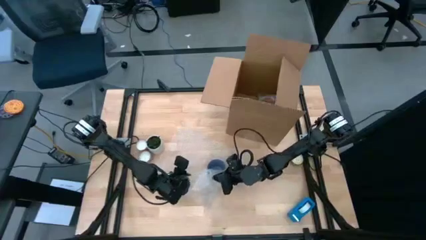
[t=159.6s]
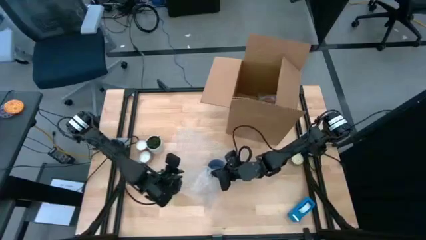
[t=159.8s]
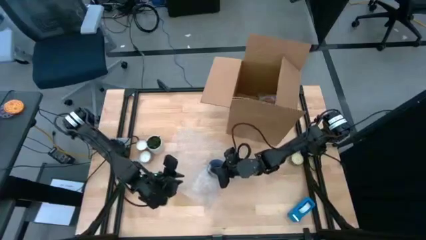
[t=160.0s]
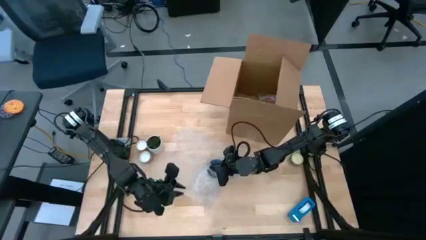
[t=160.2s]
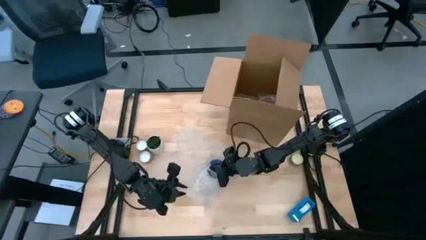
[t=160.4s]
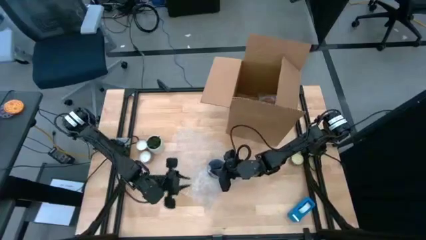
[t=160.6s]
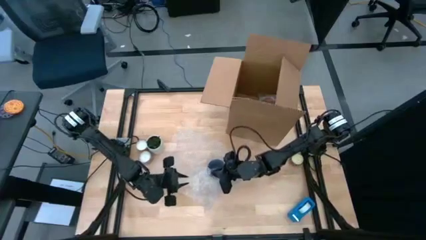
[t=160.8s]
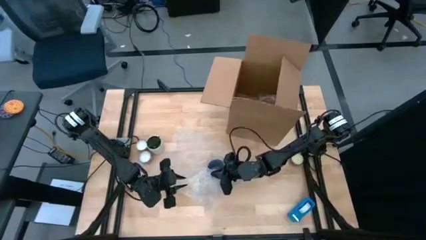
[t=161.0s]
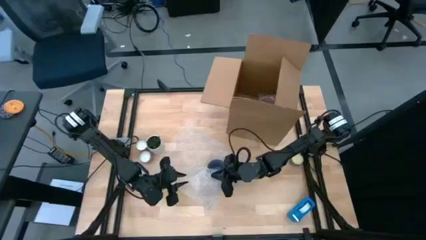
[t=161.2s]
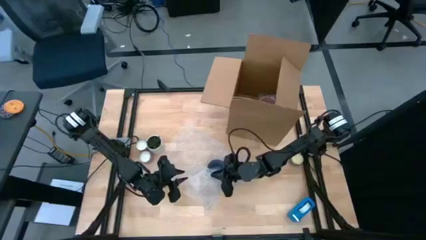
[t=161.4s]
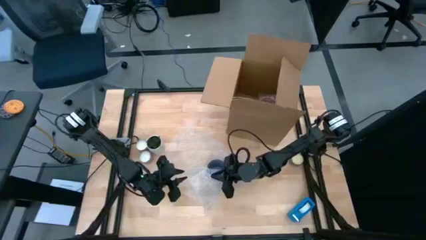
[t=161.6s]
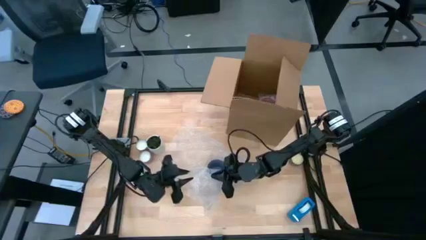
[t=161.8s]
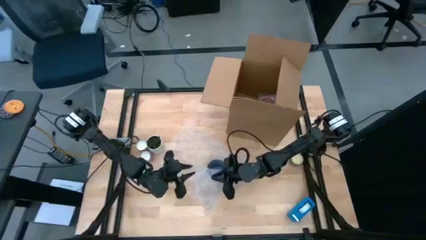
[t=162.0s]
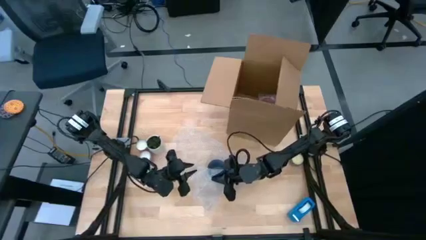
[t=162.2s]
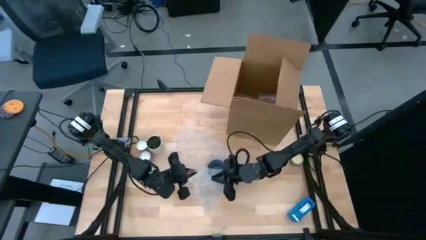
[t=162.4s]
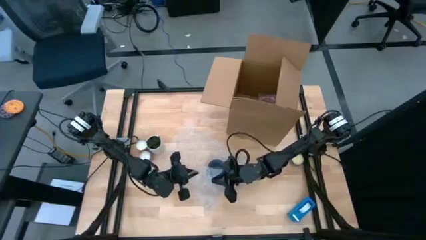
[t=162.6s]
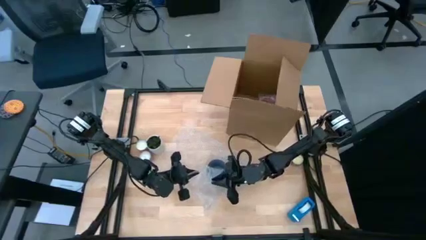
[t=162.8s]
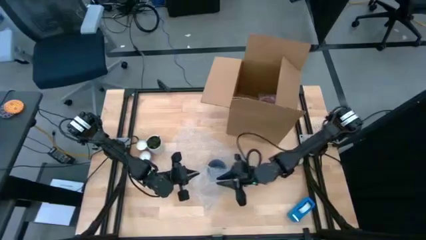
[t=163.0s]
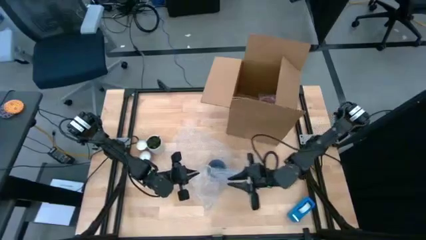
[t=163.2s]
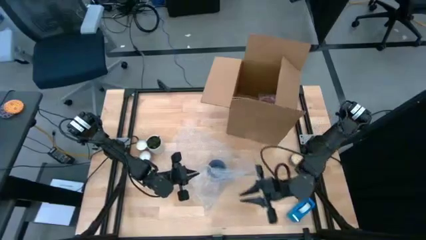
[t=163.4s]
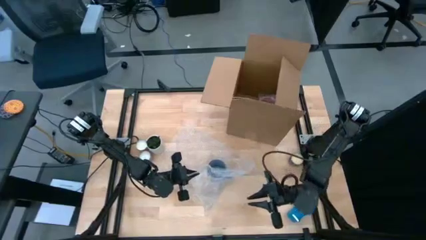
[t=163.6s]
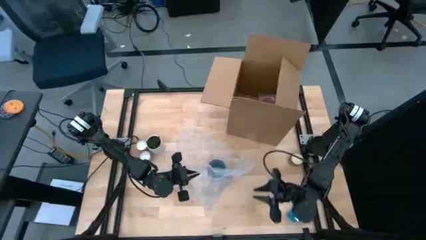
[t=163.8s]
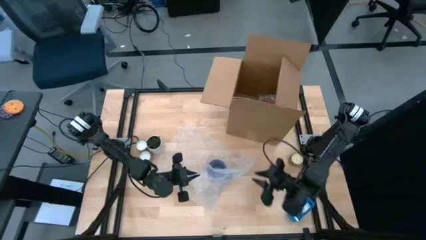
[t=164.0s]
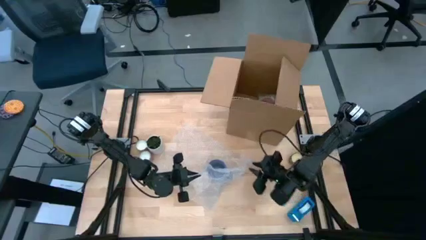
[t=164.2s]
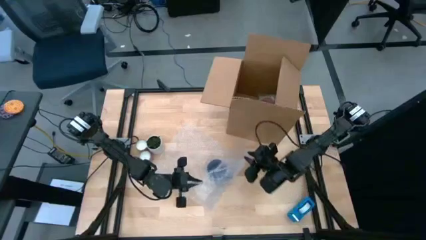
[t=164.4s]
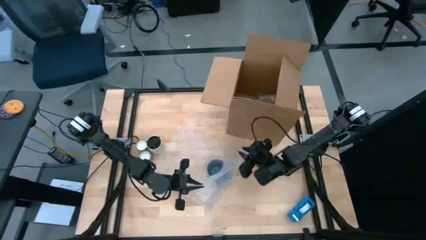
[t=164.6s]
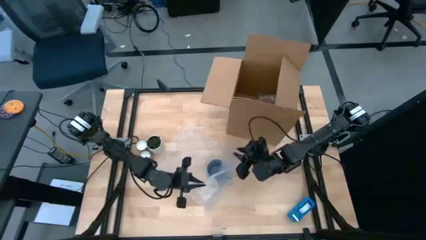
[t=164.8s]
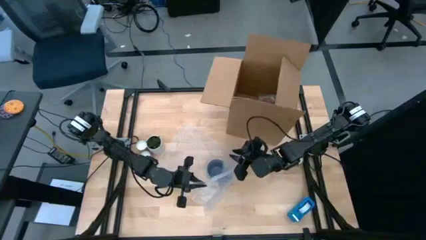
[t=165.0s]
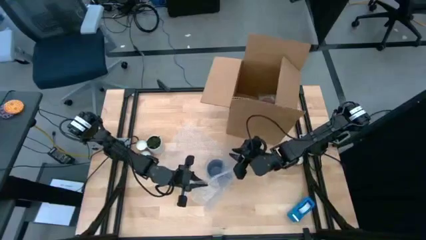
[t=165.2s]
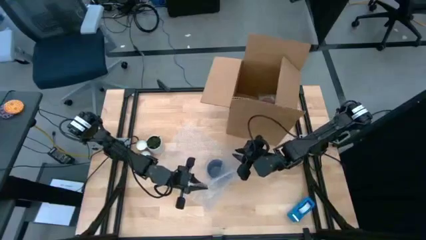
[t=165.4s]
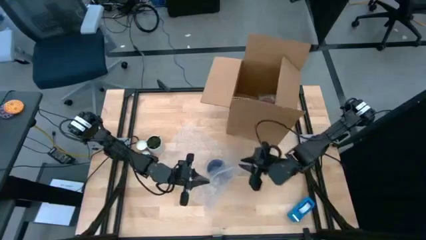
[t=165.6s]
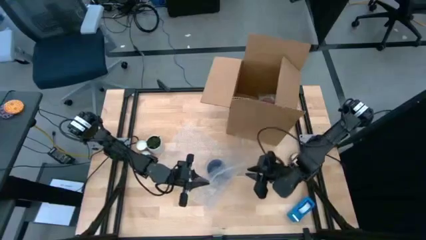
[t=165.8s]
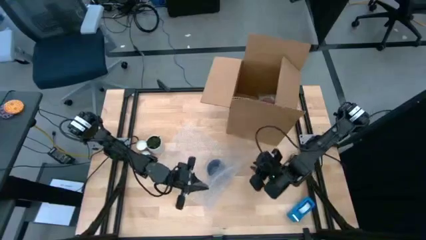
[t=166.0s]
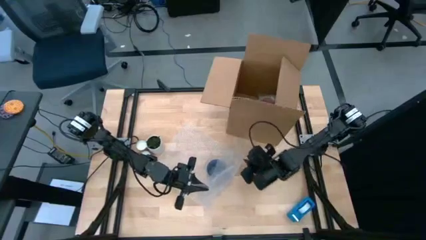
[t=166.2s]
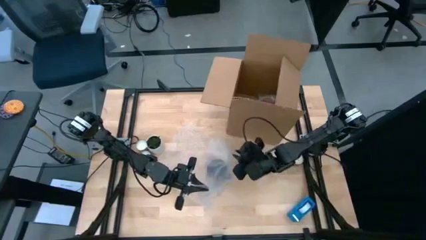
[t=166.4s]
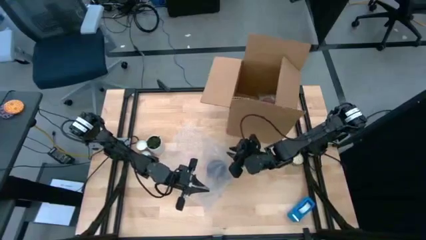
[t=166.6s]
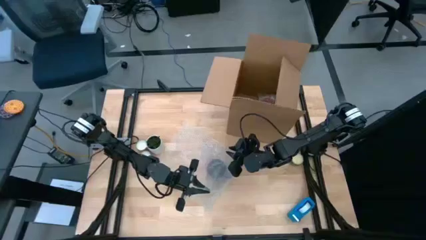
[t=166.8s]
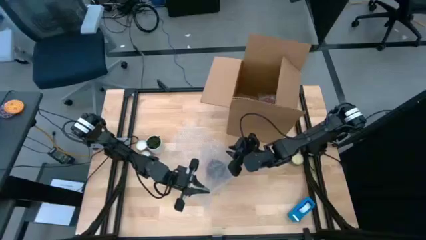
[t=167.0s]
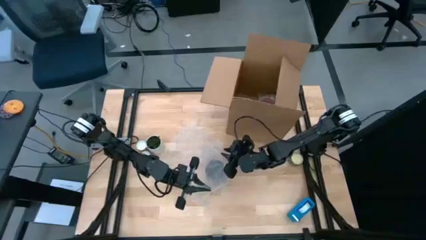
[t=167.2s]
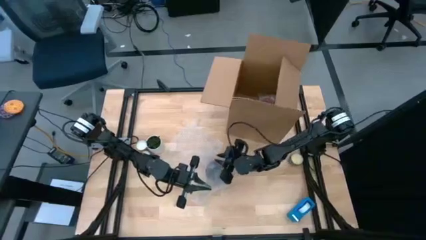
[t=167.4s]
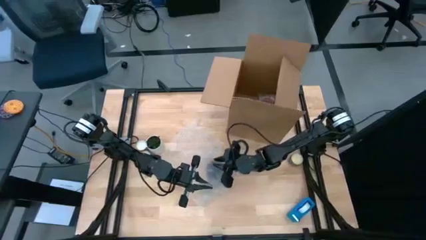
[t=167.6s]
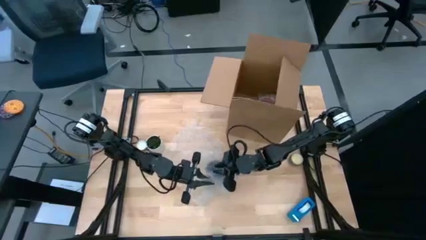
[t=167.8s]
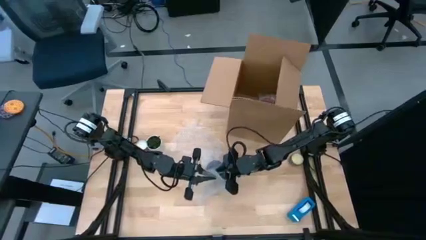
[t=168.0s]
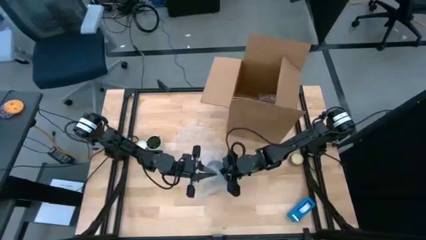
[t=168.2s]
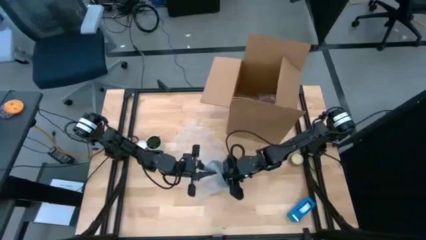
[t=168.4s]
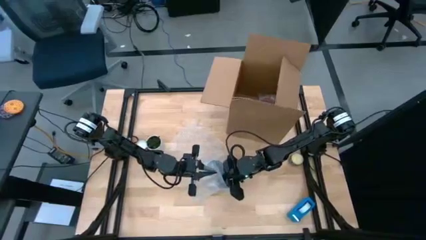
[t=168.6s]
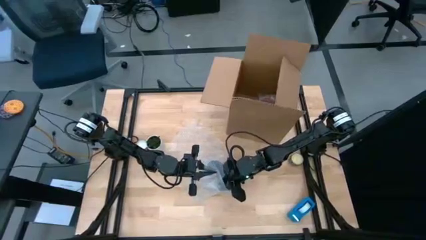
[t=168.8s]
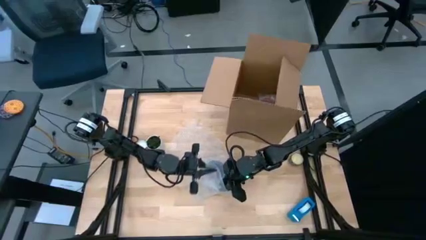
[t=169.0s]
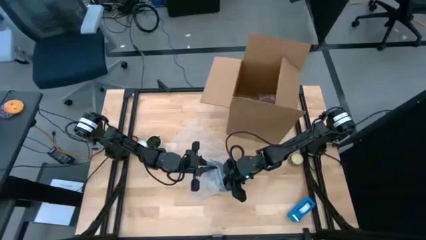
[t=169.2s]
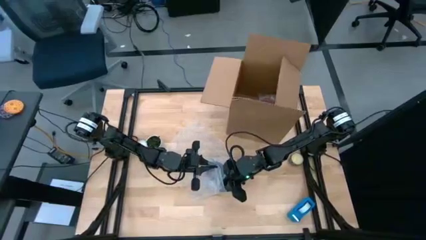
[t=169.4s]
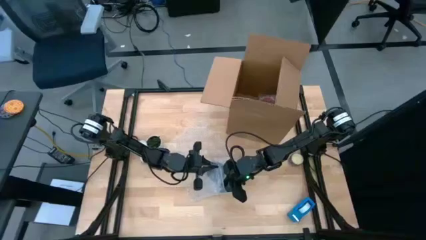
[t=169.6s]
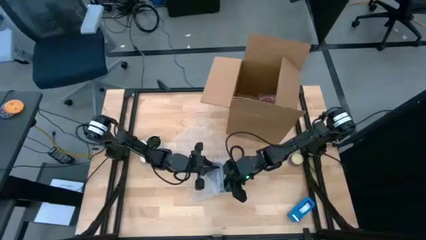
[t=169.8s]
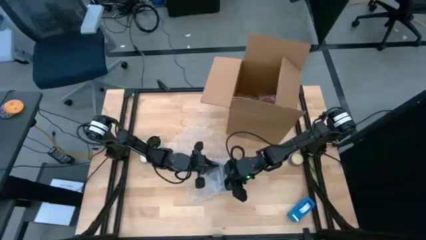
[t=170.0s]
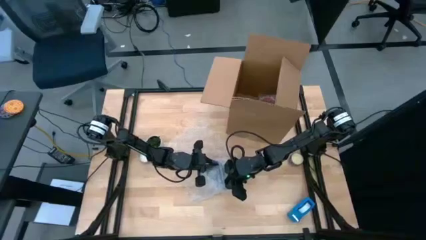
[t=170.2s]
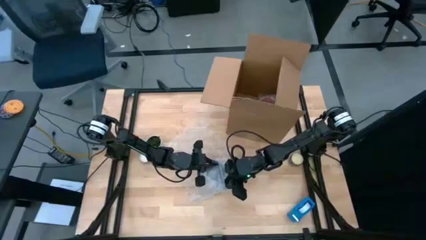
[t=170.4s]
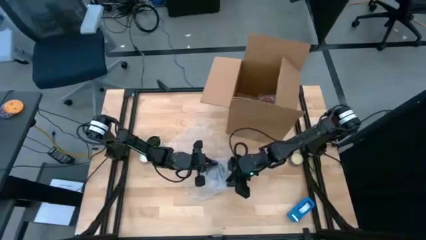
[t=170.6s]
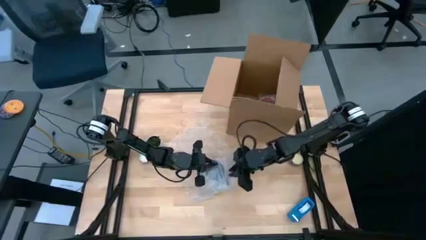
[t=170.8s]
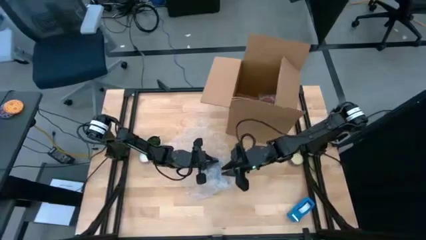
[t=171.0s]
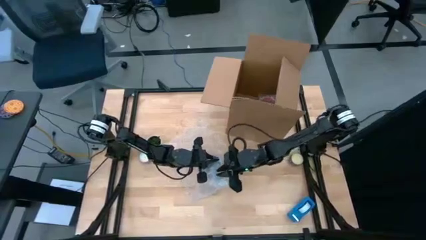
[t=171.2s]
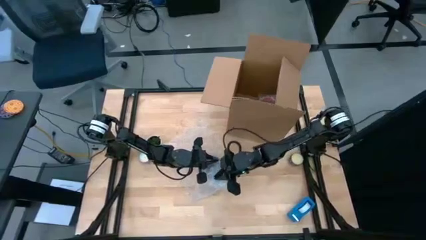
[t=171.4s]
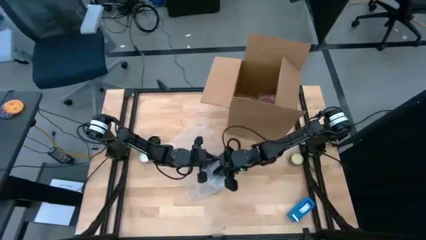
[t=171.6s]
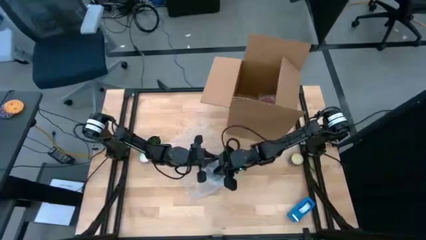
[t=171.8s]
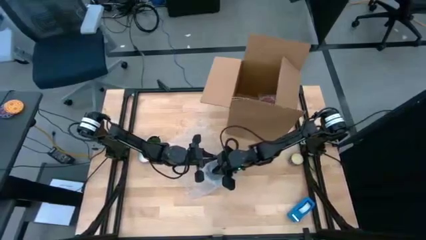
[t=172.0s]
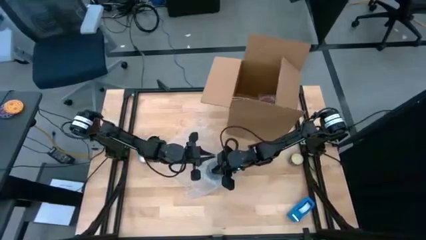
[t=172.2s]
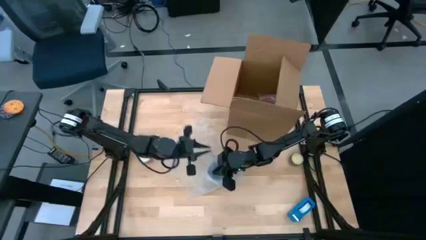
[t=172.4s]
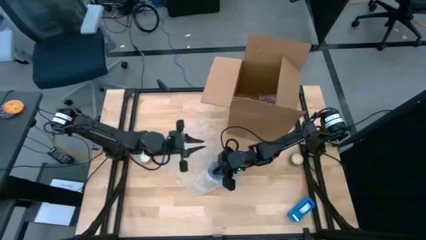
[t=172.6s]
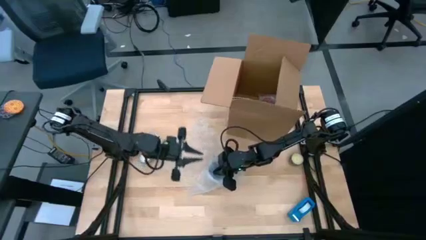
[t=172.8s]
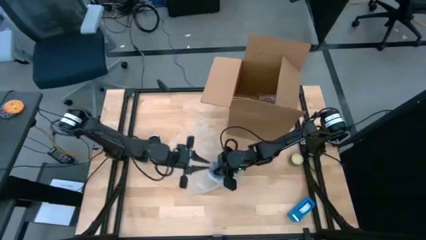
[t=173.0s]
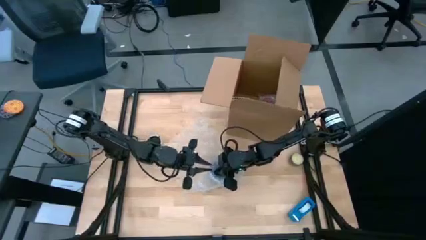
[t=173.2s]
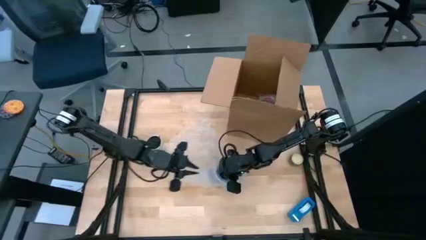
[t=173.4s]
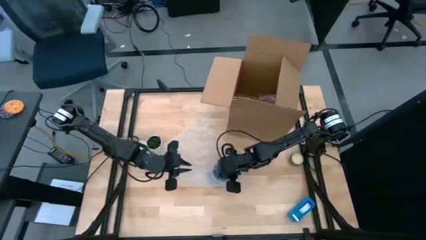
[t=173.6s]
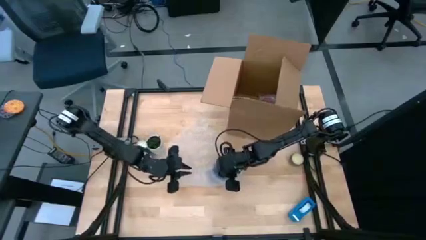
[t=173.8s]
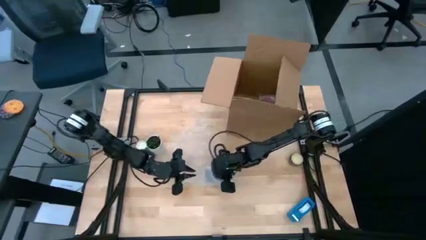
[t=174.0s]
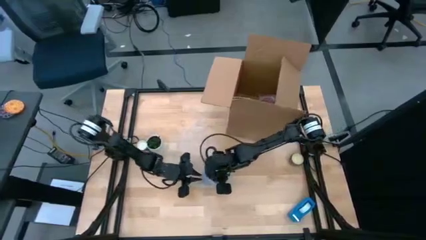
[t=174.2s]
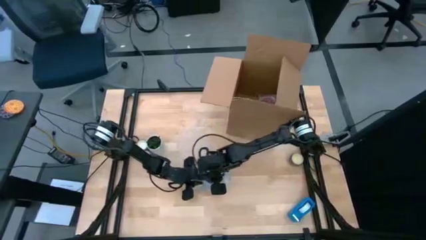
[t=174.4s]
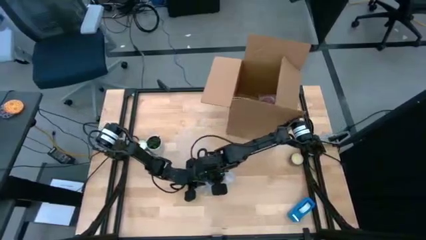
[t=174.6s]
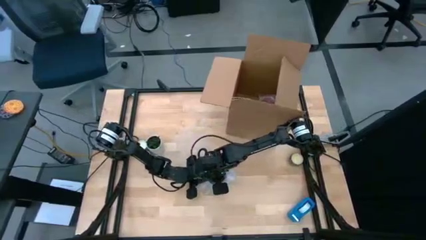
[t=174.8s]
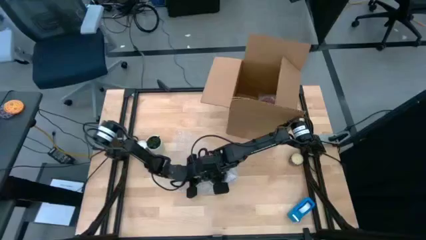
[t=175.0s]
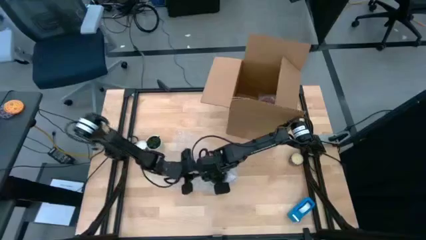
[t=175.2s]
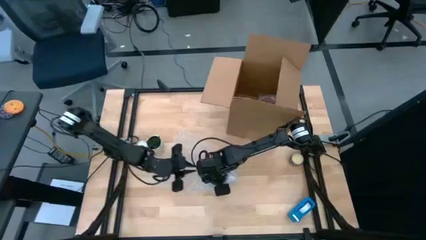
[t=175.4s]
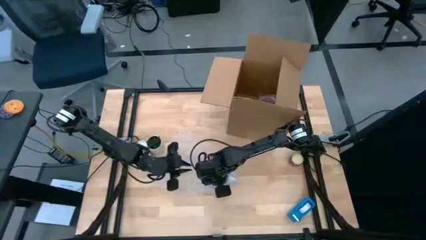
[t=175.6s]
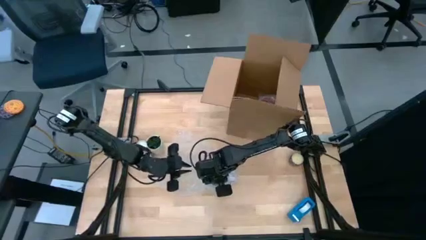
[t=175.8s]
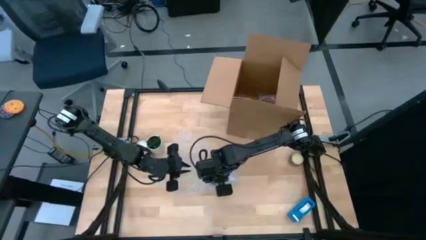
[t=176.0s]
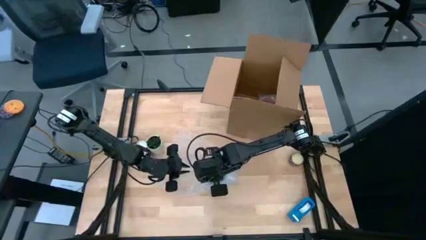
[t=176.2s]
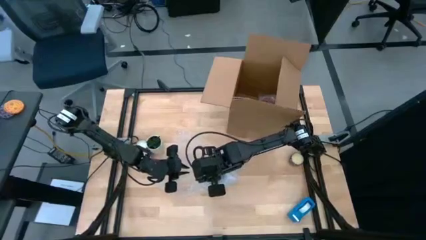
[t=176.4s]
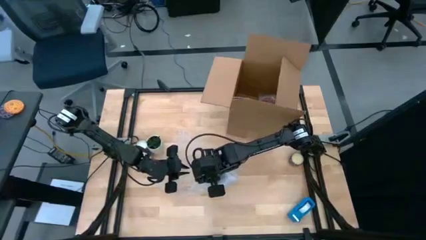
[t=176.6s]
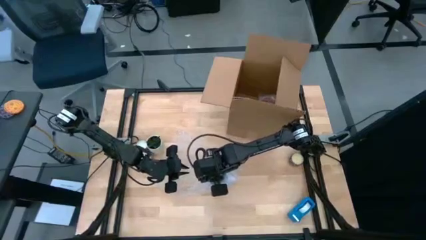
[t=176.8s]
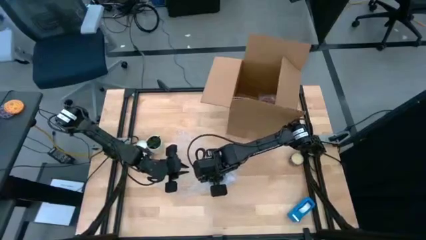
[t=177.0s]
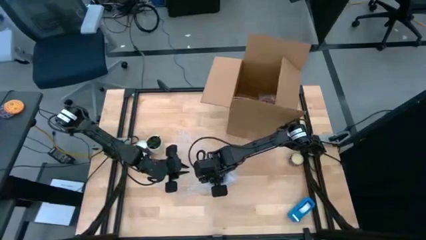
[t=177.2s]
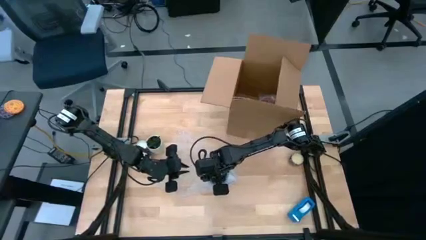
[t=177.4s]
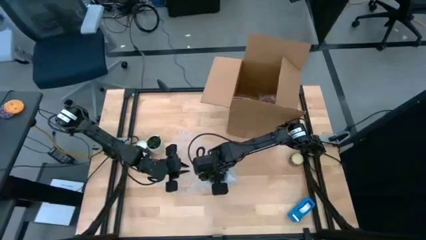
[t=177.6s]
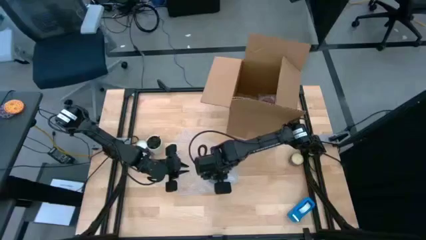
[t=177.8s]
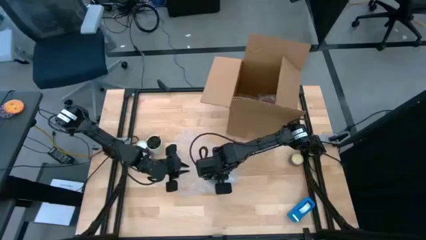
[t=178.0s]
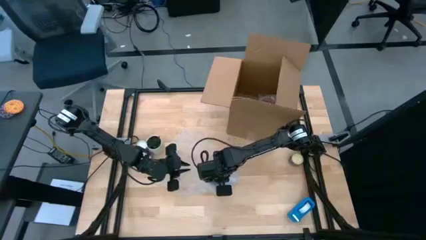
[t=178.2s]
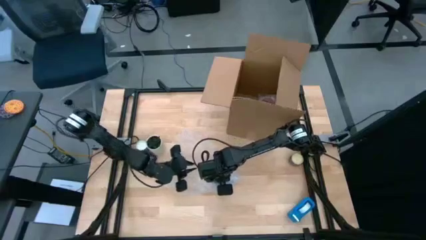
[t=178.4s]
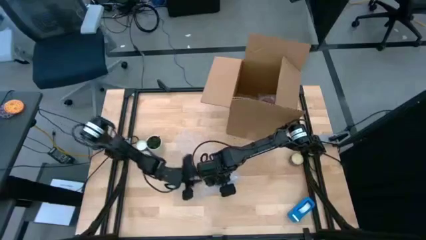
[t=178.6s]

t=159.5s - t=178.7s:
Task: wrap mug
Wrap the purple mug with the bubble wrap
